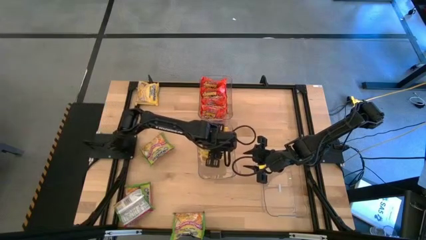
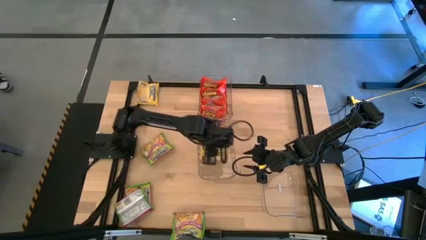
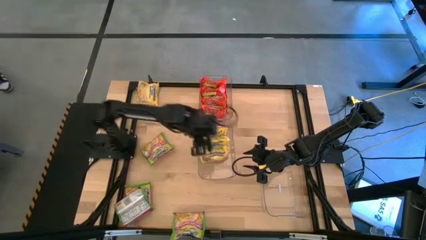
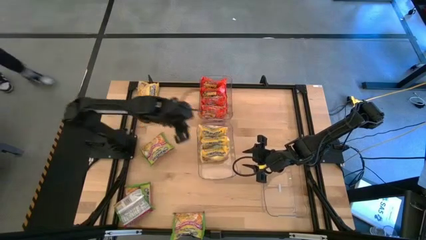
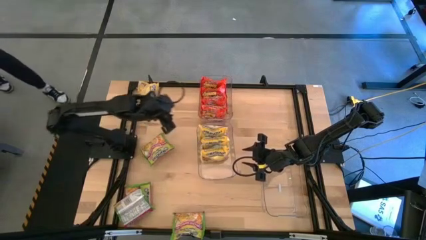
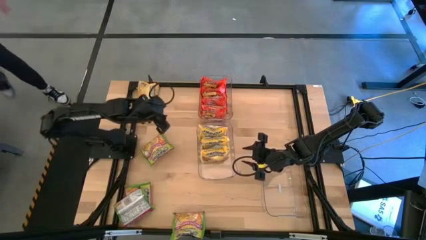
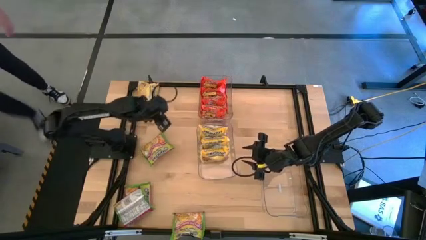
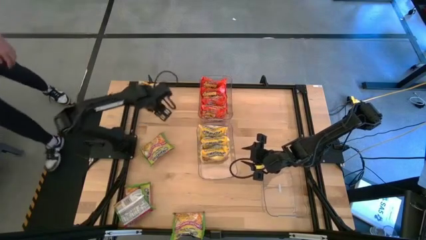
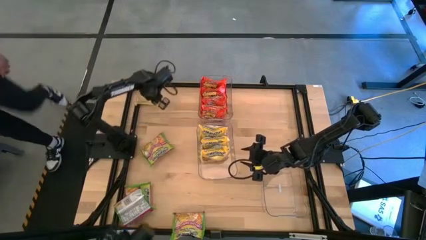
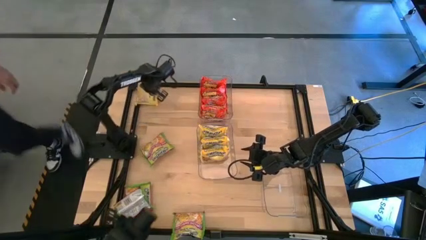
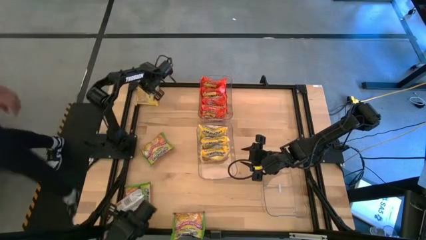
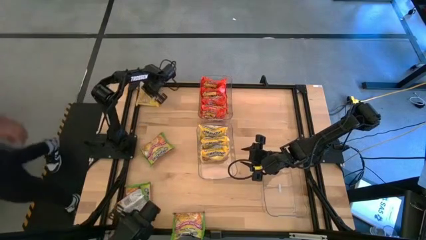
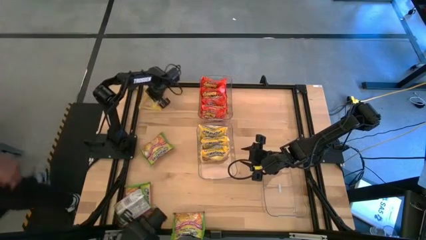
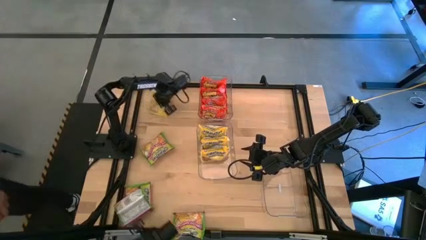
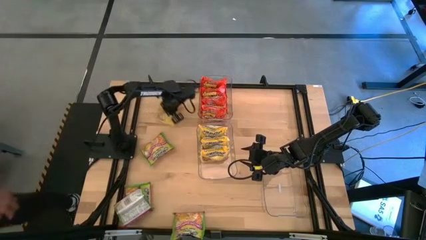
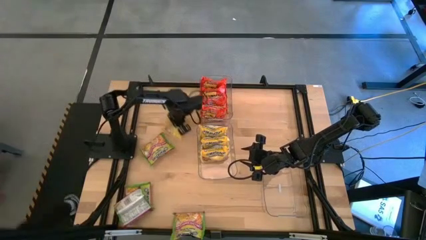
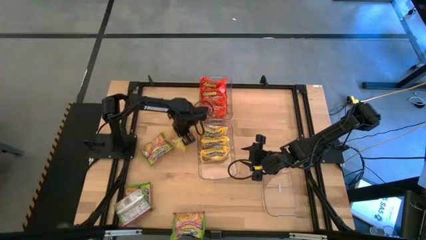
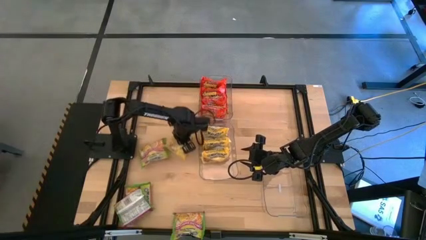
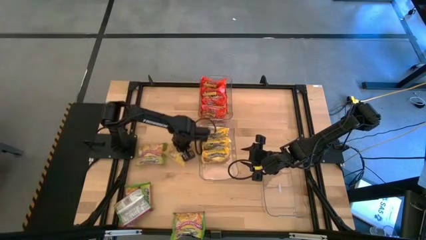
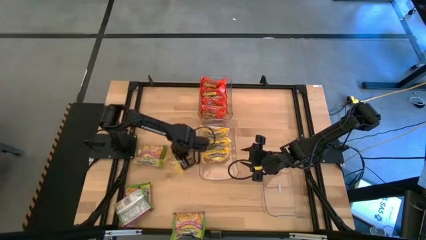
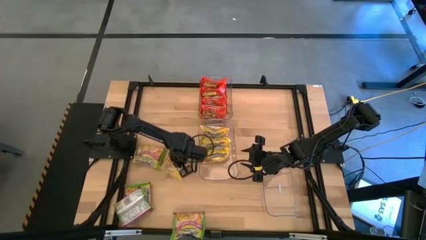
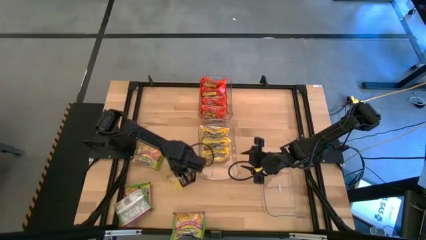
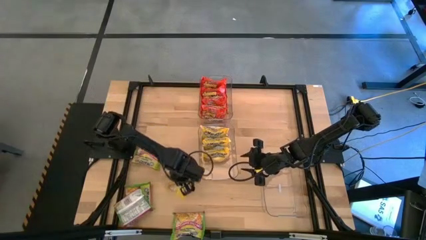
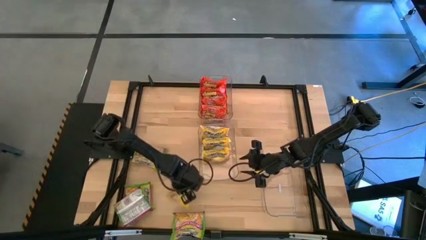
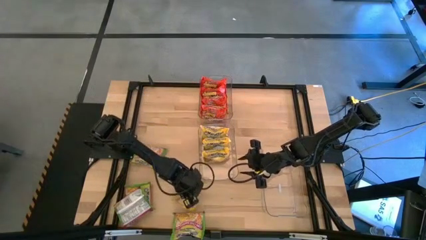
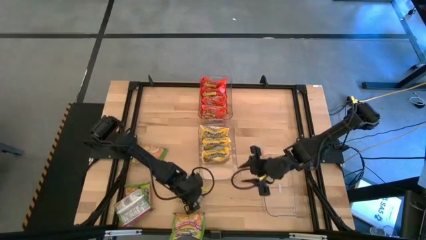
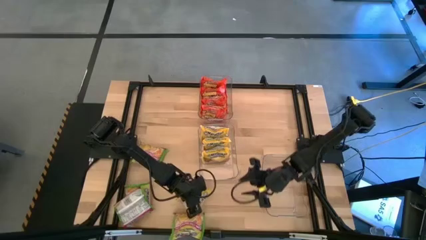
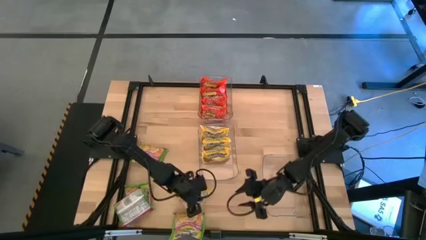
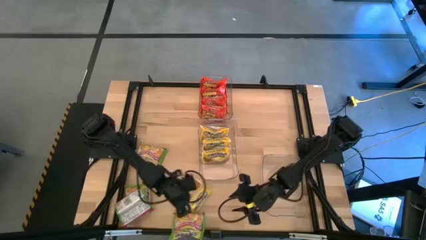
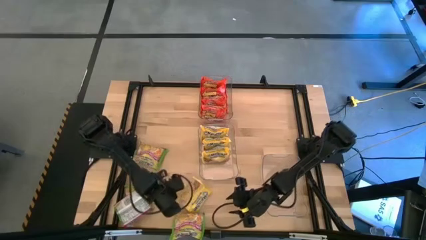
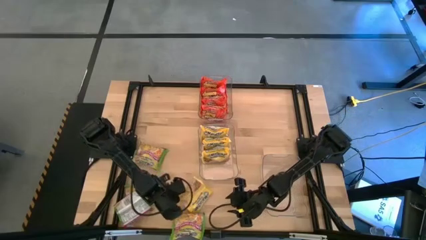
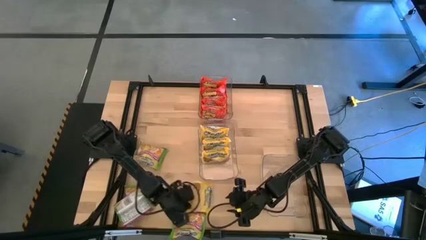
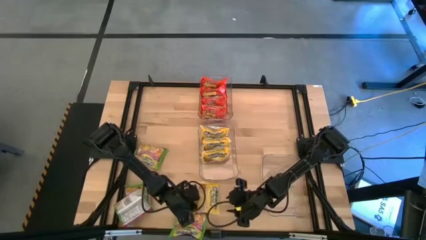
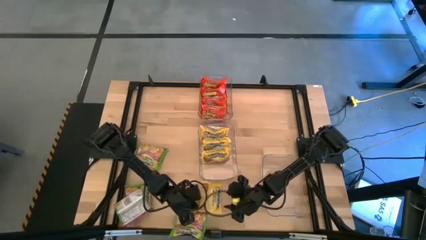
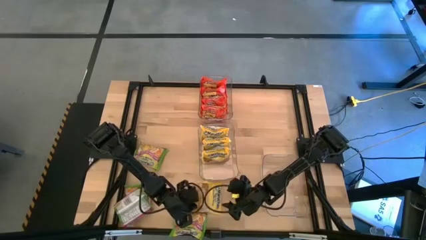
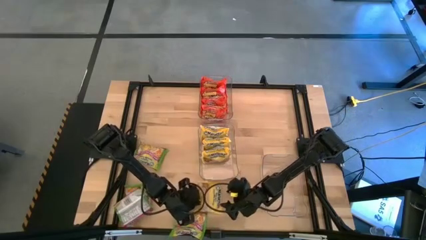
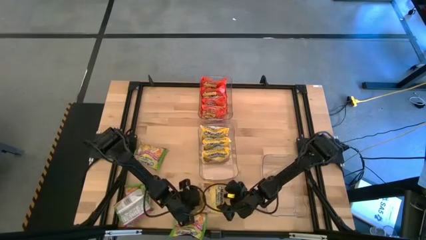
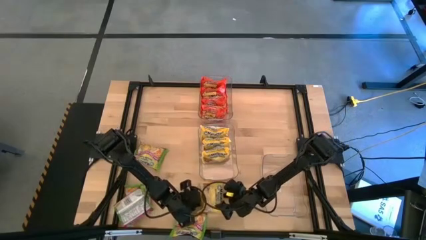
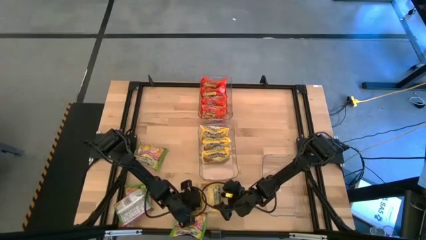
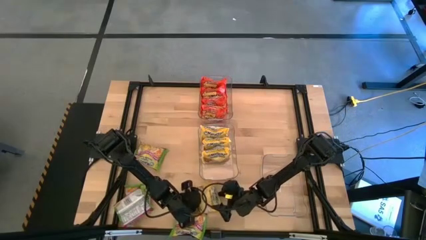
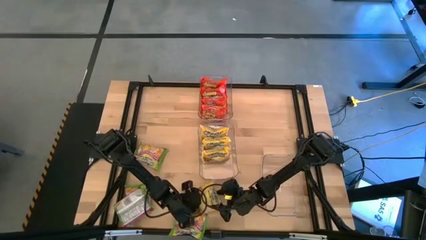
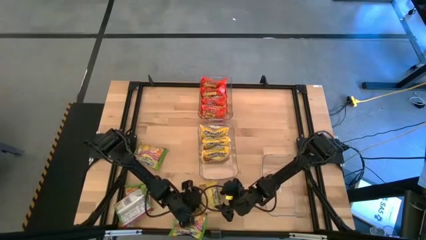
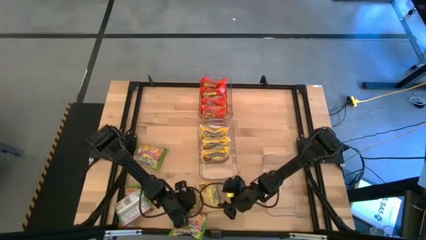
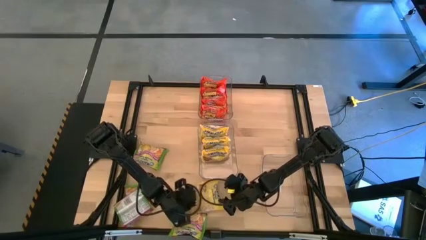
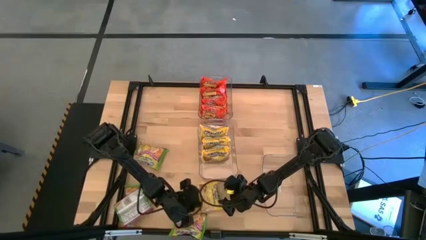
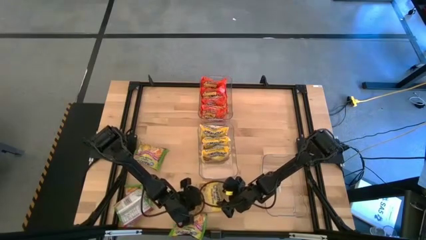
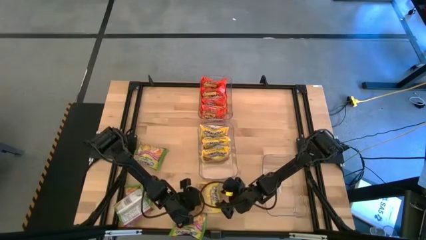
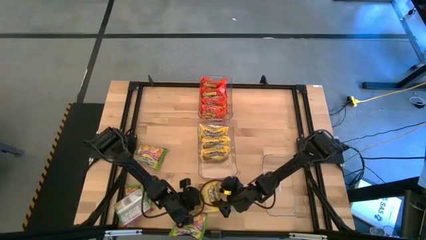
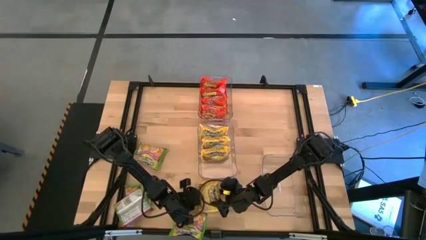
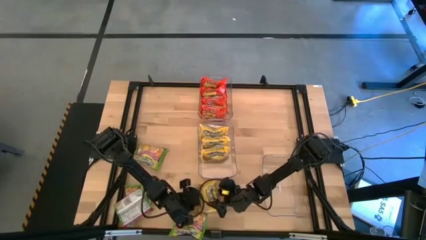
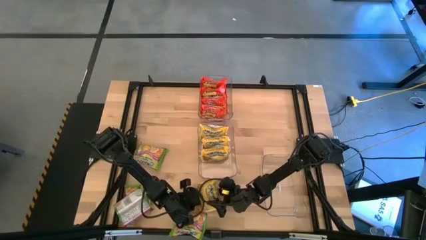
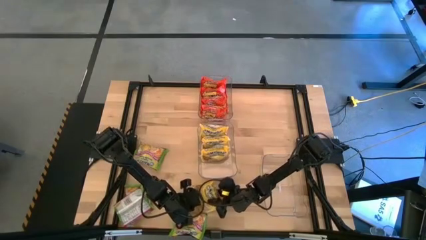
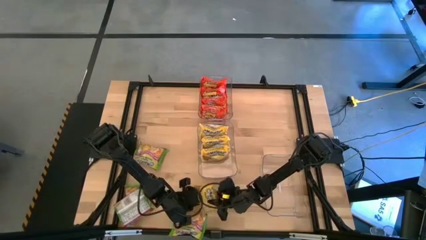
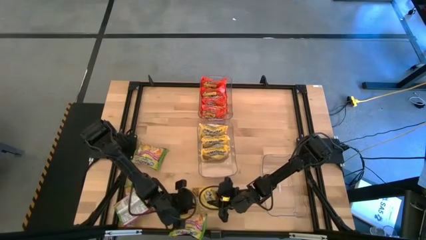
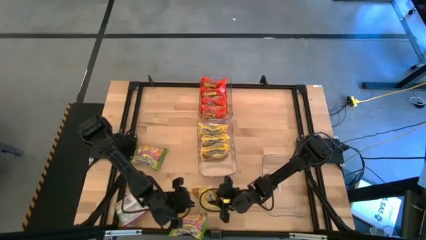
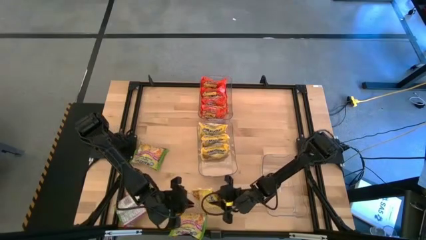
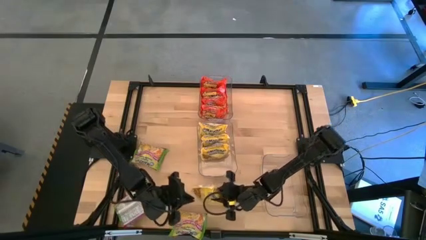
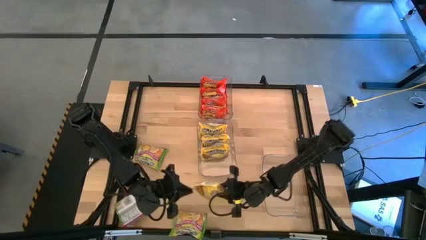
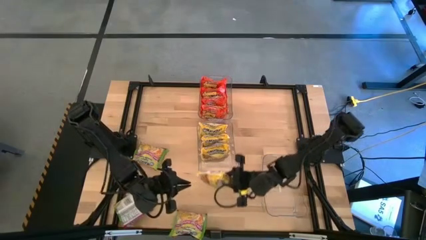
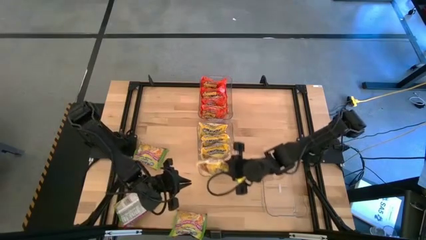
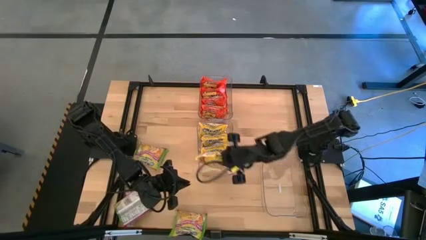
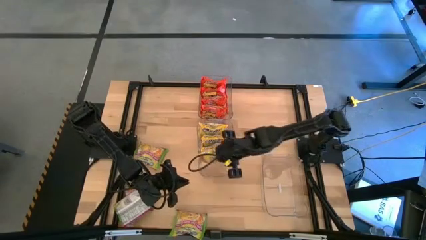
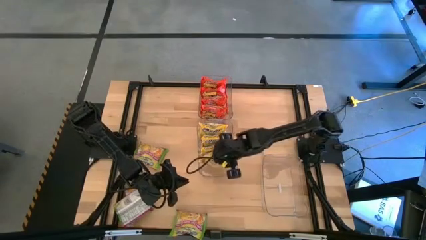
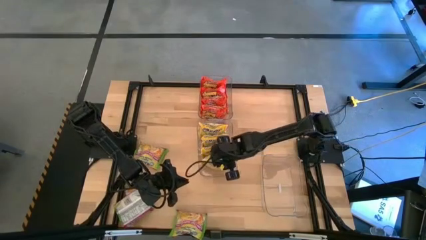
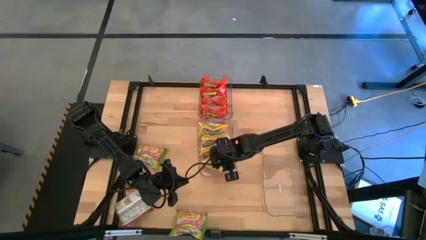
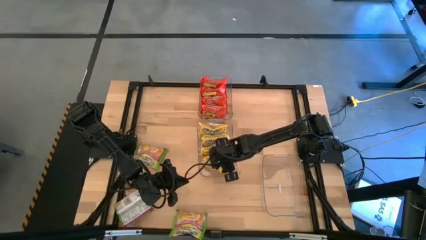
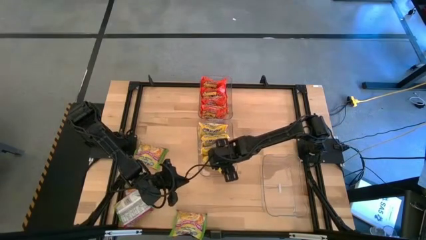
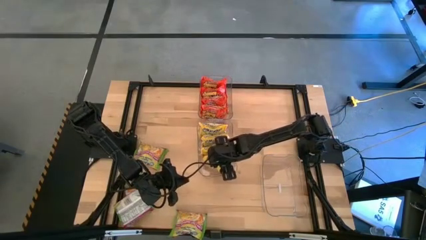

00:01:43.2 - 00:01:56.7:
Task: Sort Maruchan noodles
Put the yellow noodle pack into the middle transparent bin
